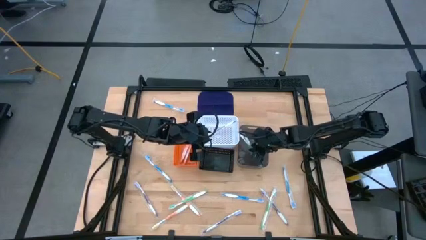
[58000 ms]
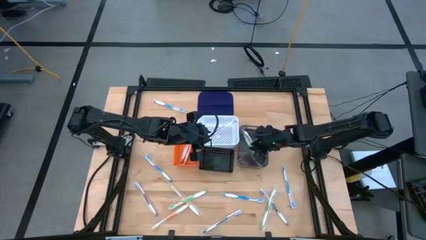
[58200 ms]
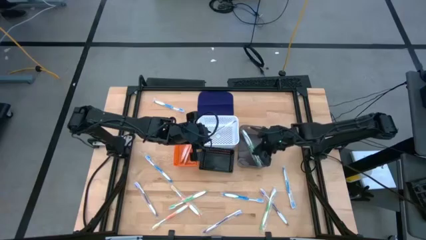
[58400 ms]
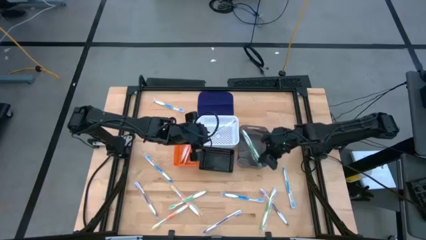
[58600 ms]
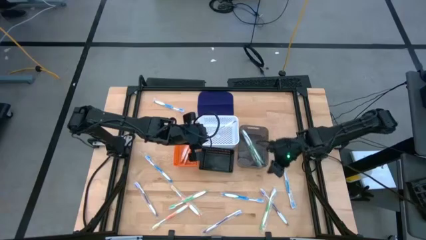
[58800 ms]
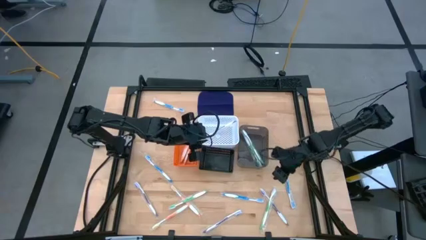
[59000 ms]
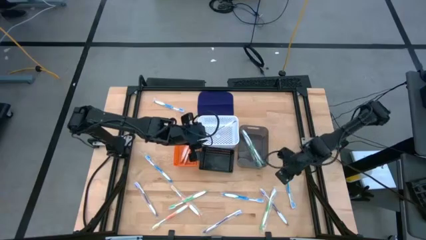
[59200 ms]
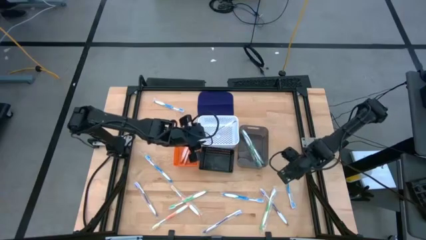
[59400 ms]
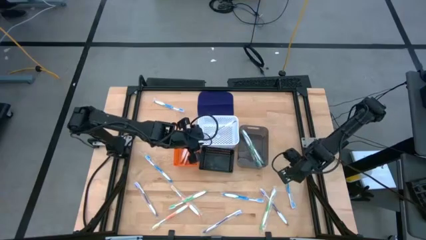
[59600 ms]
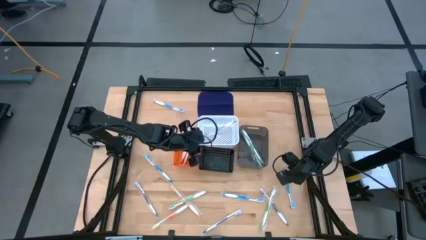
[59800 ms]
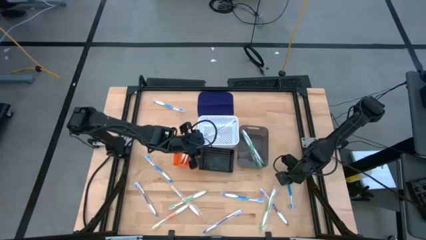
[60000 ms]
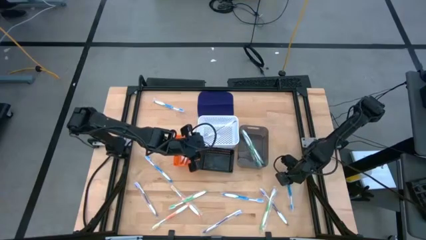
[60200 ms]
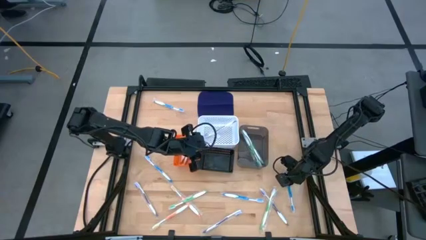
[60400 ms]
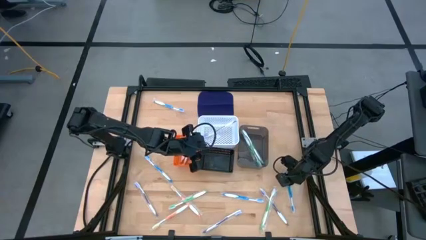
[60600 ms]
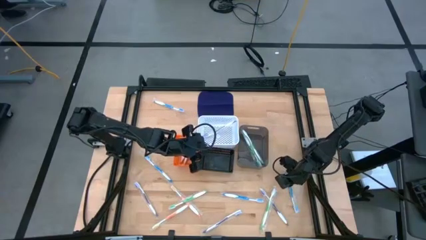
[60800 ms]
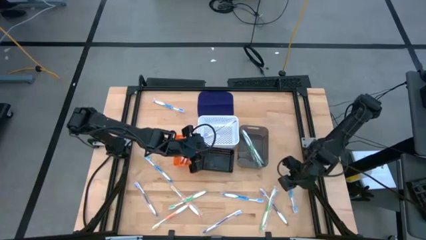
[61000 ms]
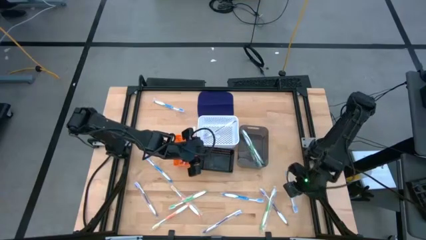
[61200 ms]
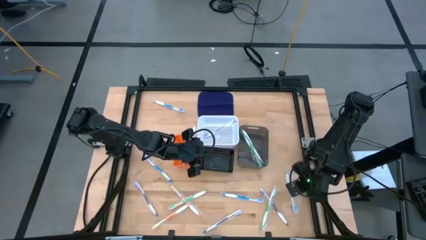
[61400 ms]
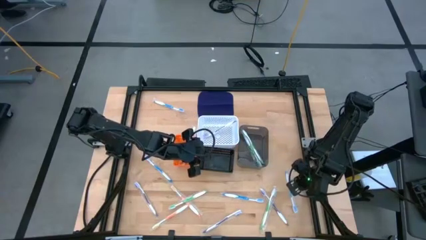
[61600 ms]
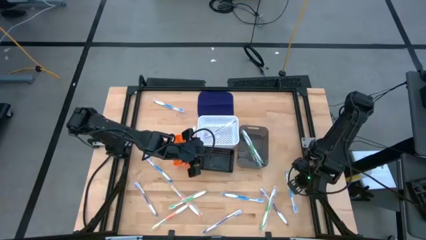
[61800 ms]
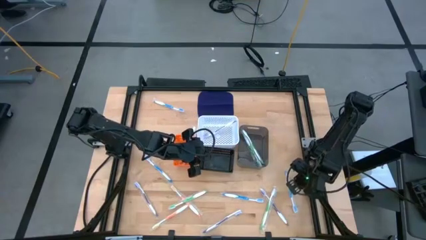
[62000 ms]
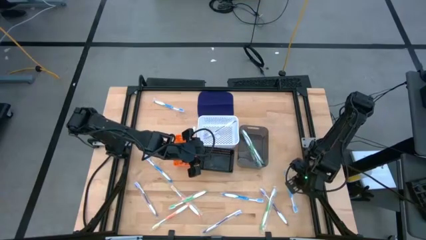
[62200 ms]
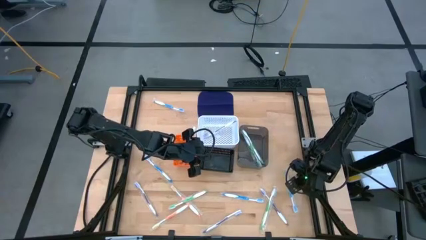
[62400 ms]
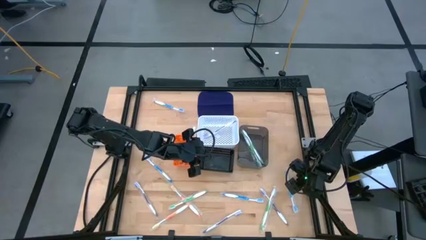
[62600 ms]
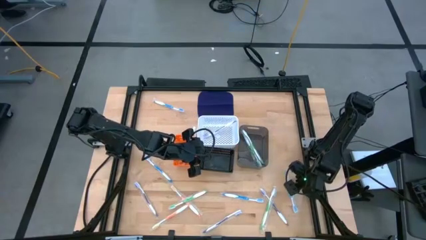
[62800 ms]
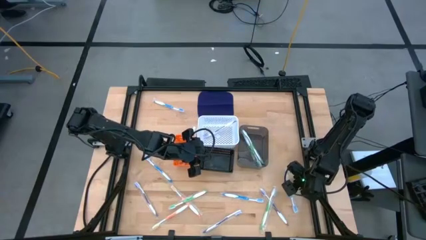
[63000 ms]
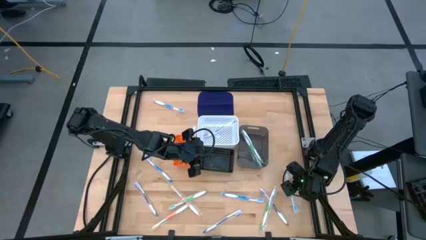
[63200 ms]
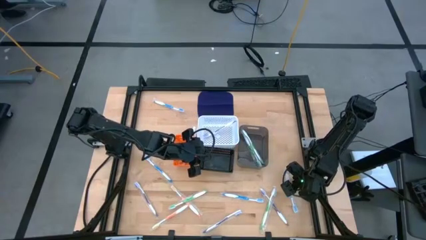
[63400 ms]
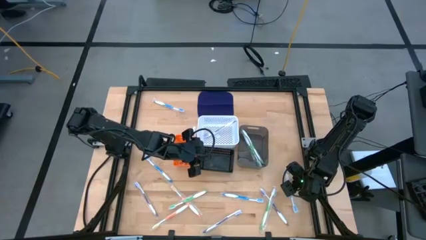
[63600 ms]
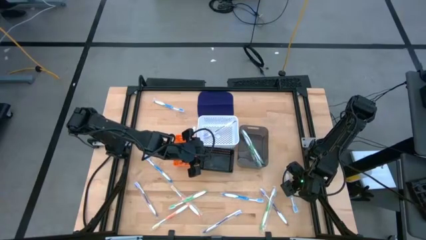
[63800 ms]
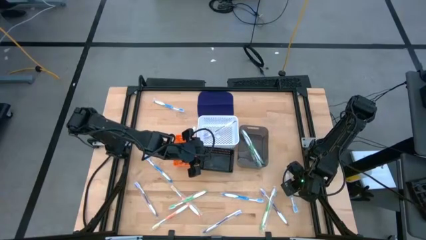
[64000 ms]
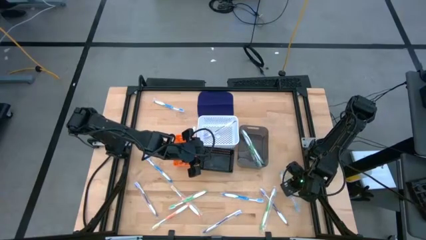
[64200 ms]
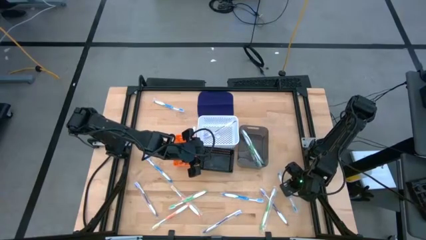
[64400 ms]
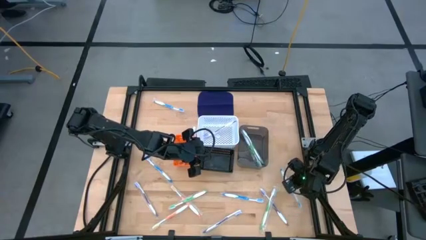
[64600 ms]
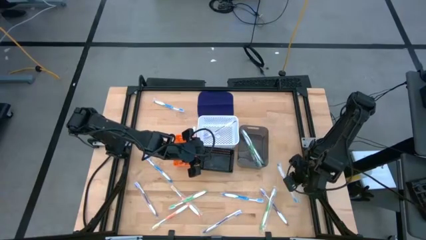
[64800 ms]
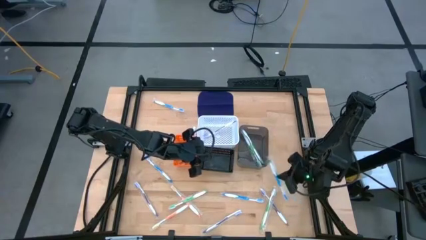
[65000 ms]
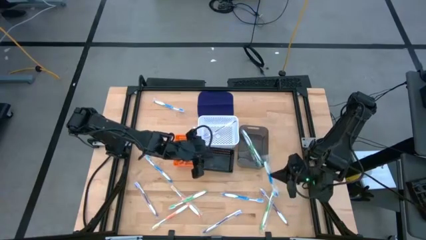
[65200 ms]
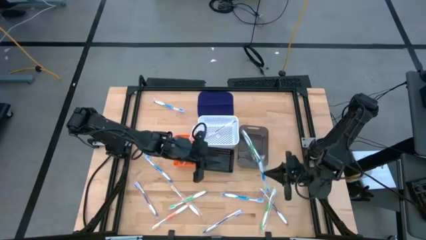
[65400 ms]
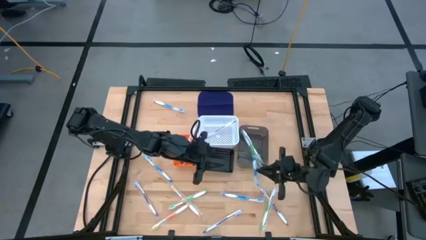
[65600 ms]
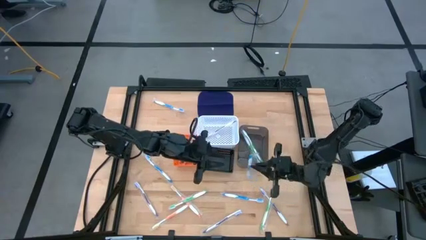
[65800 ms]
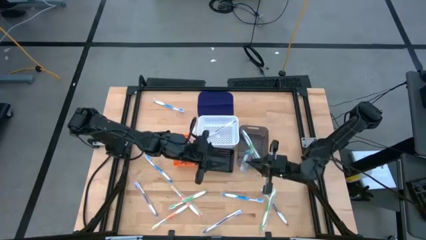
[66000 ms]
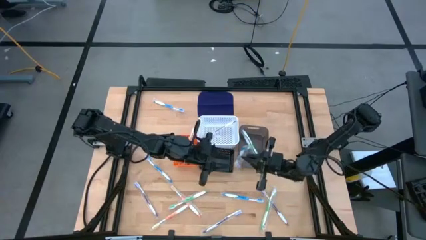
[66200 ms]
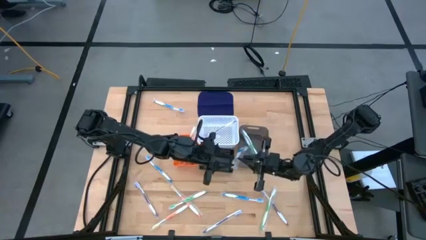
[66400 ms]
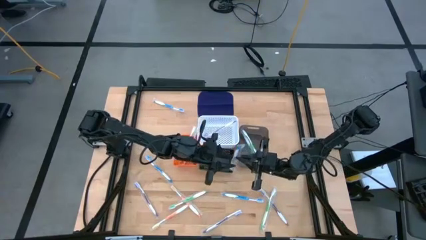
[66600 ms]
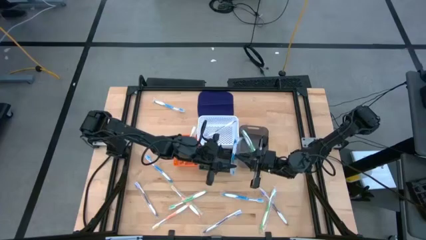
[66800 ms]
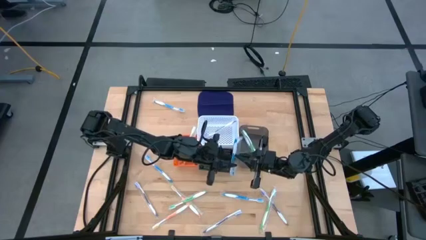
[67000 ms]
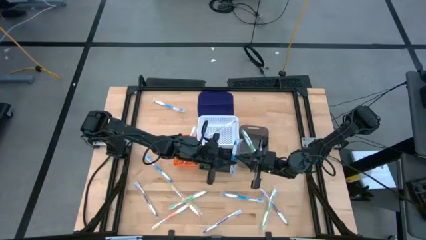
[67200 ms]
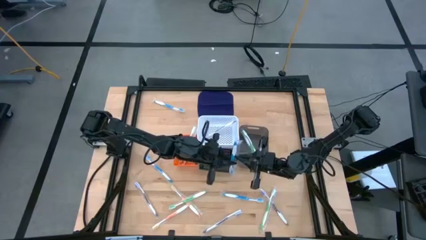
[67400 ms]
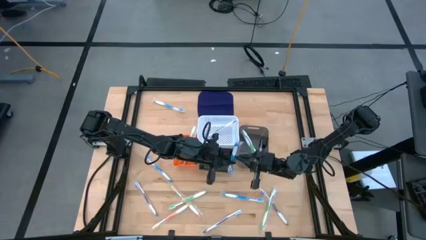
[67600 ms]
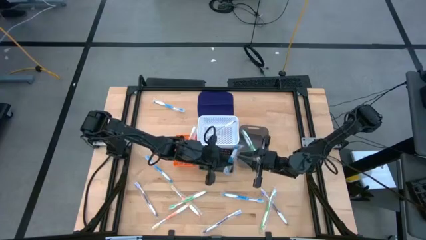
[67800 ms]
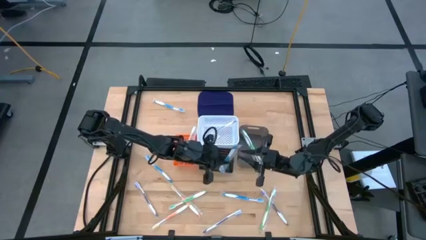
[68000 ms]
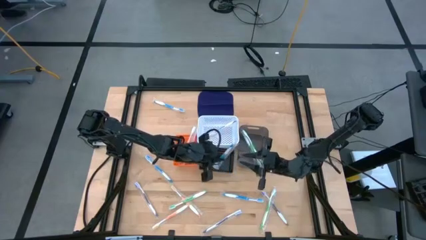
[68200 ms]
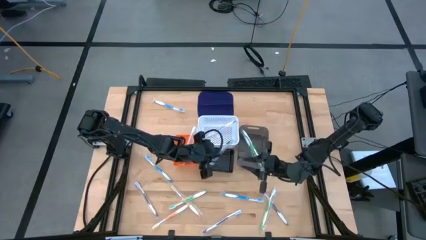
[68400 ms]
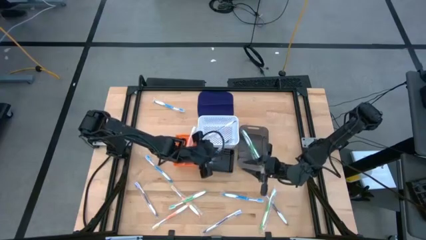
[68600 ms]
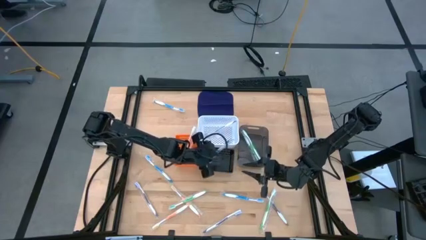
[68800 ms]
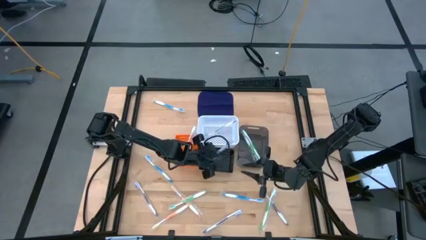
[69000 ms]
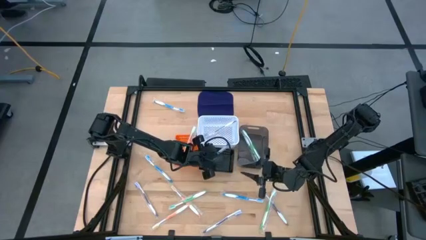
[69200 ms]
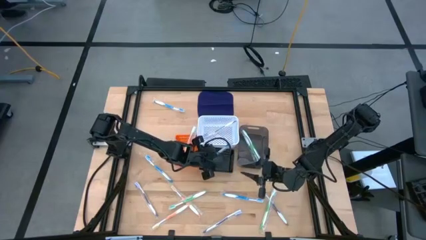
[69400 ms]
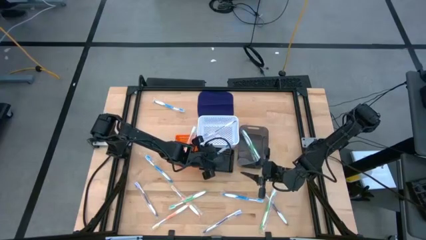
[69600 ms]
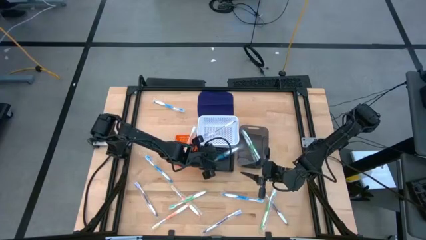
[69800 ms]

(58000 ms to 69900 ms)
Task: Pick & Place Toothbrushes
Put the blue toothbrush into the black basket

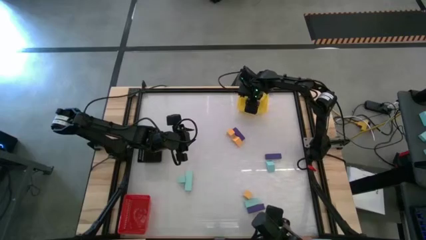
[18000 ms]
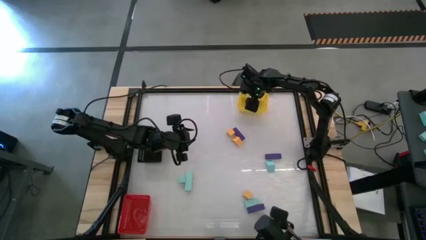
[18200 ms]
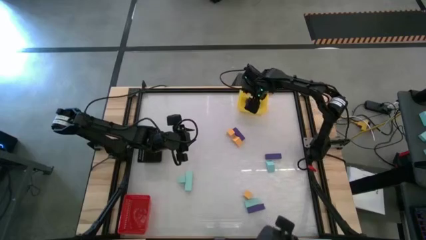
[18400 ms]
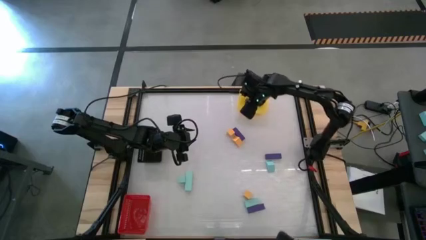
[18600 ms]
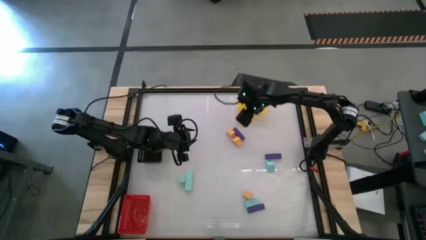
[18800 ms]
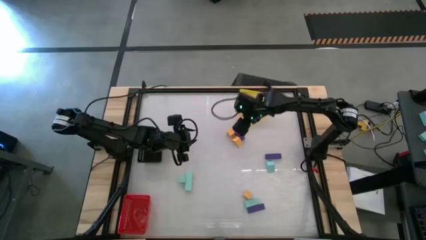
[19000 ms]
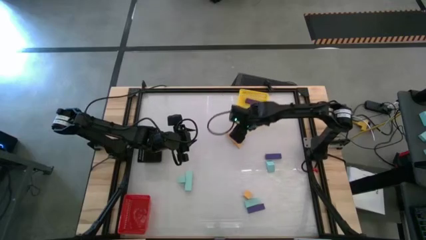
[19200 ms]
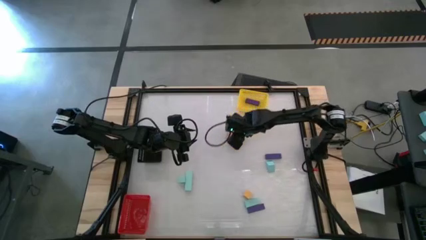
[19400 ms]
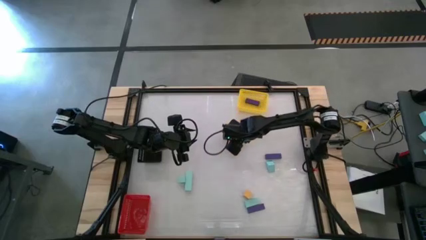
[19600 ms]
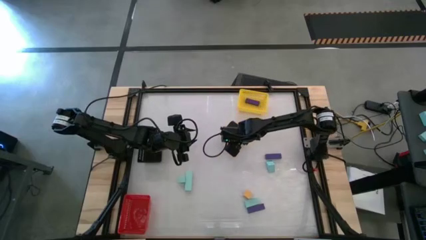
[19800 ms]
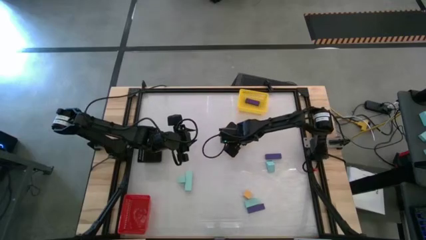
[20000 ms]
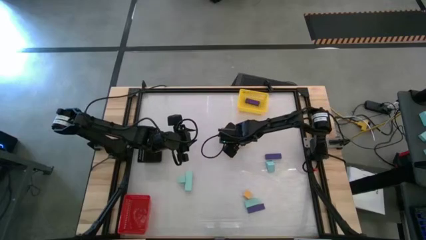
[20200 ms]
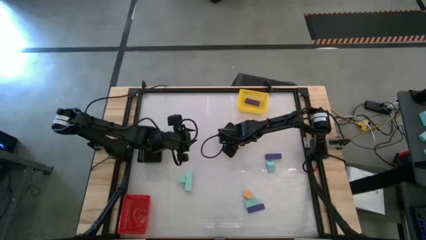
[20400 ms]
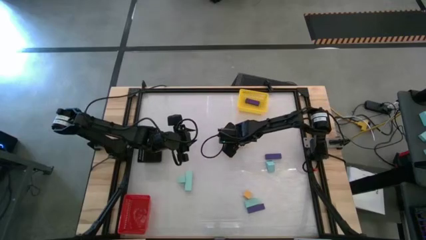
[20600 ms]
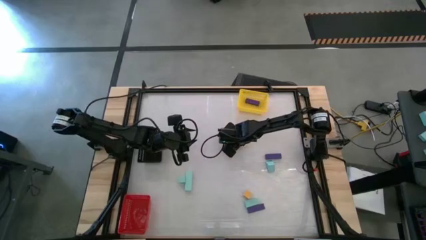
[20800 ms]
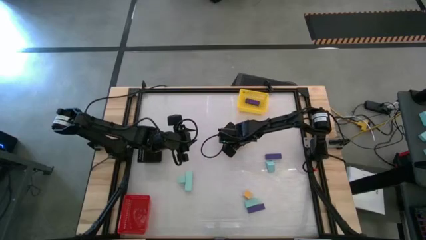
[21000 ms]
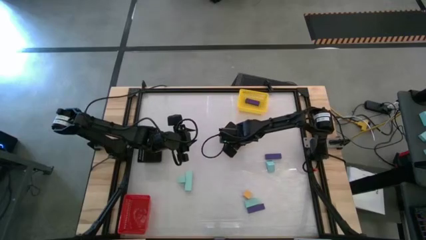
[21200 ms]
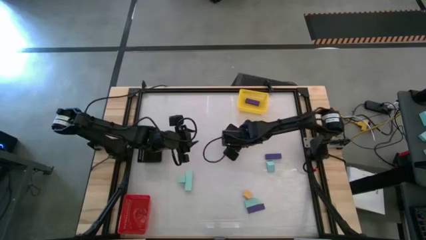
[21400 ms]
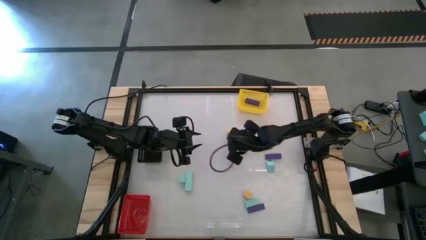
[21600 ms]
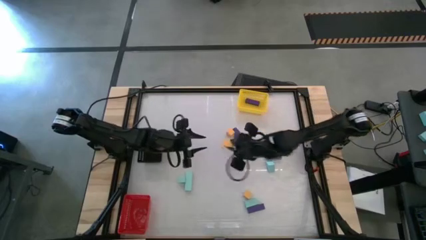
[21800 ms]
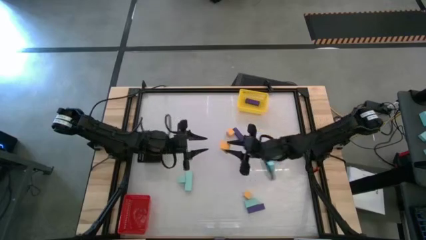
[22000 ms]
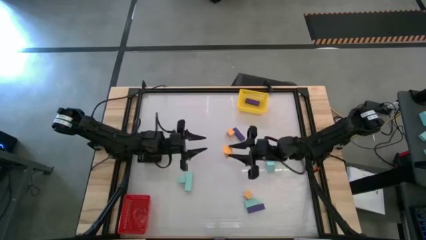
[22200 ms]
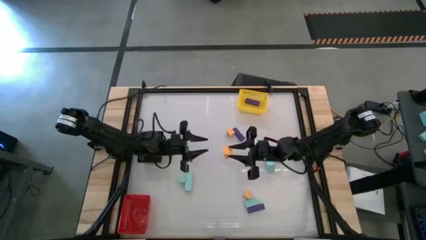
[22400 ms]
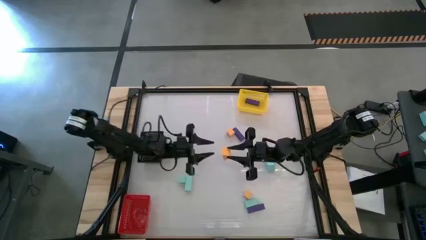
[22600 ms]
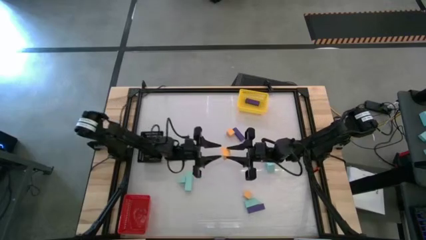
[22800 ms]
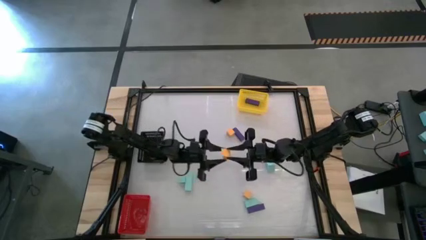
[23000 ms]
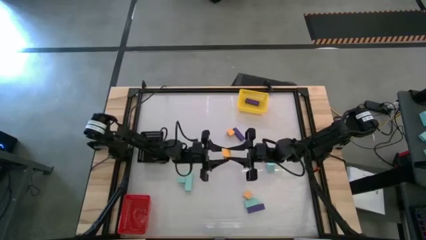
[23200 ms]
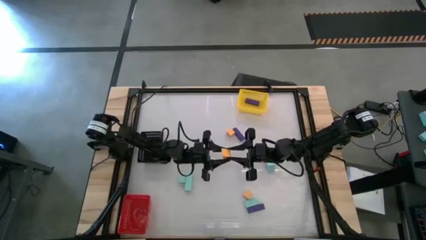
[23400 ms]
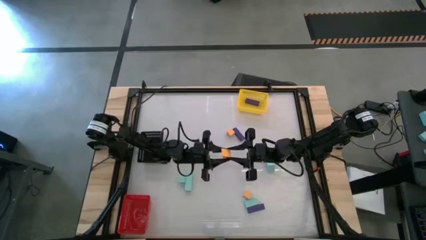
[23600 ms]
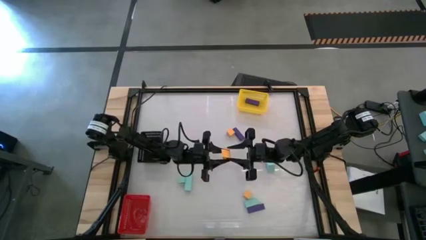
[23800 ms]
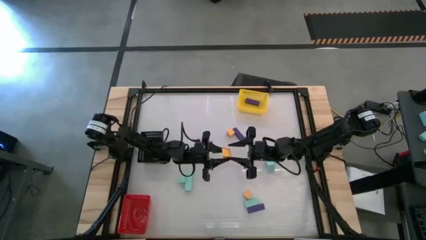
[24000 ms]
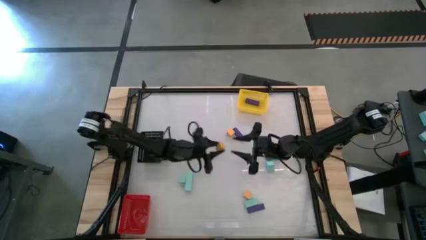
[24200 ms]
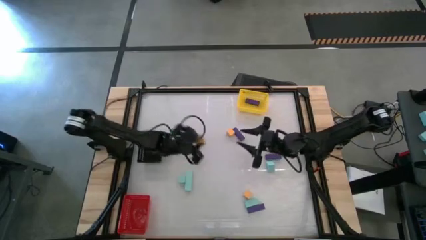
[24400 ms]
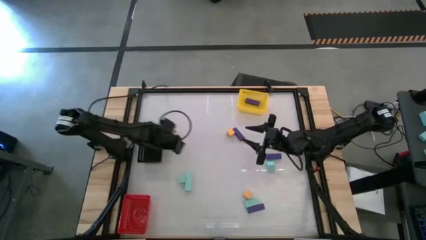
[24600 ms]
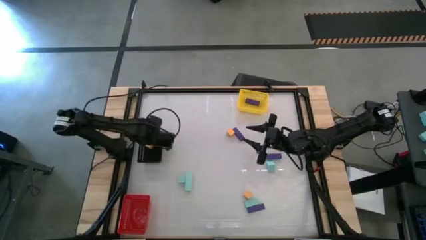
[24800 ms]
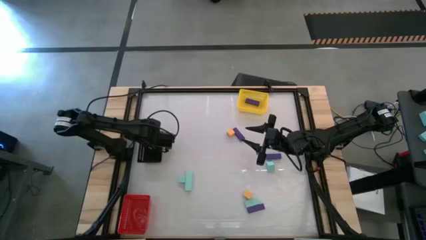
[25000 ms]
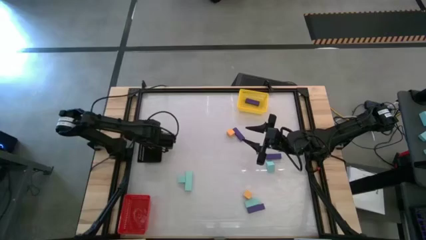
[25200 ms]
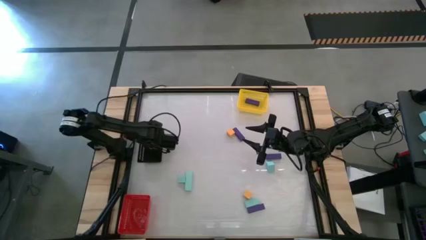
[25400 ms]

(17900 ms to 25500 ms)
Task: Sort & place blocks by color
Put the yellow block into the black bin
